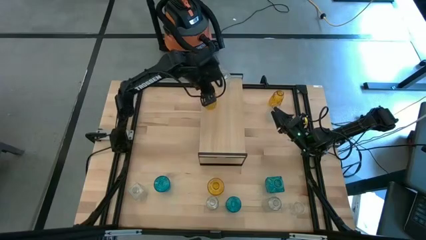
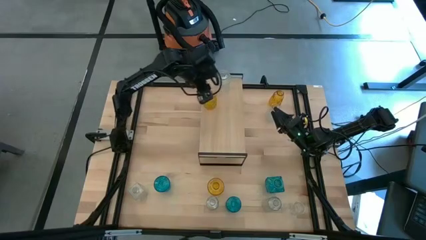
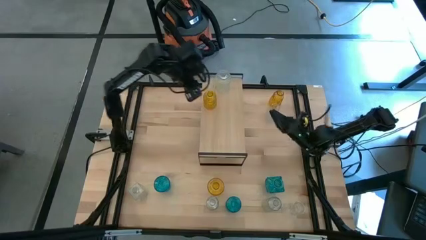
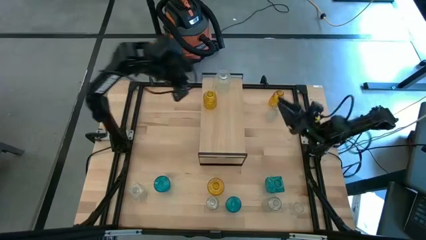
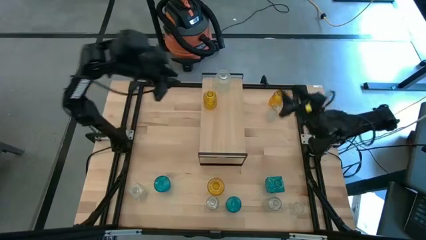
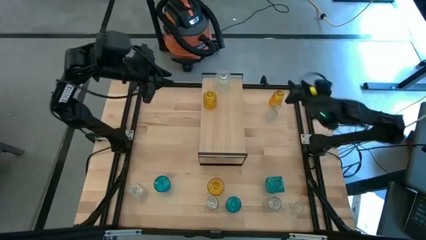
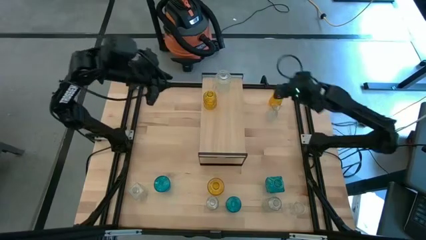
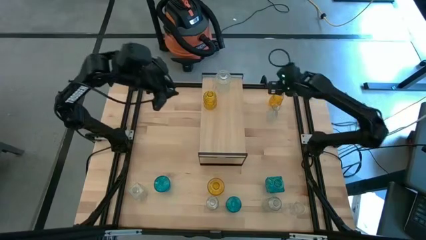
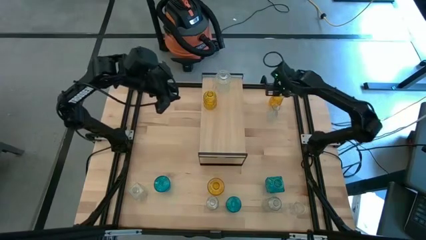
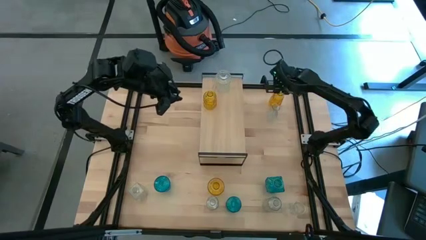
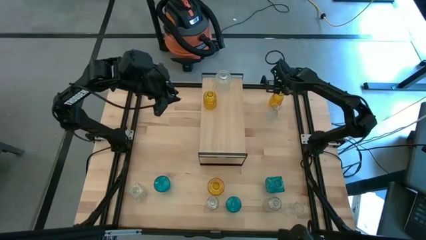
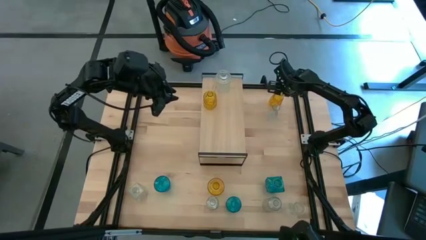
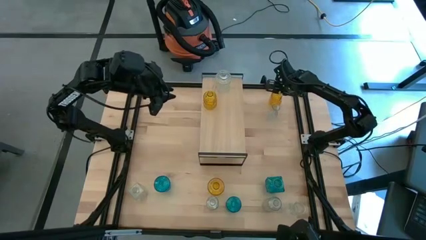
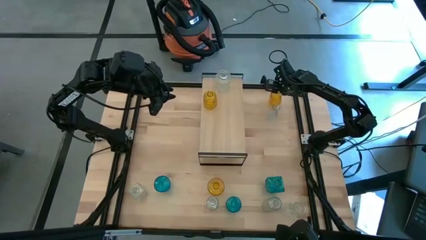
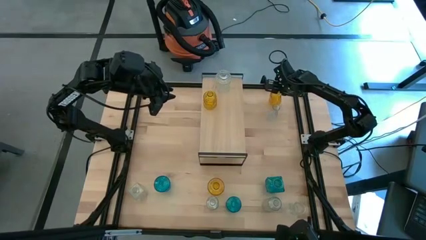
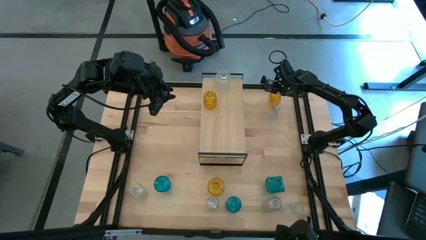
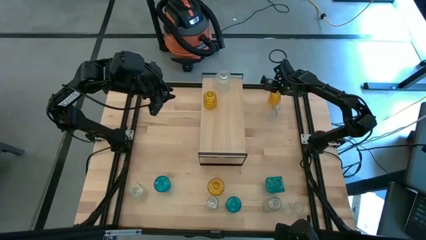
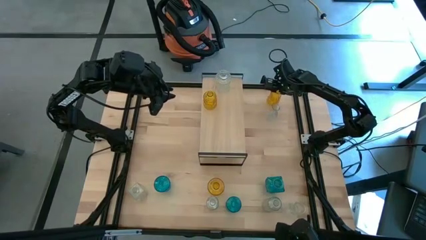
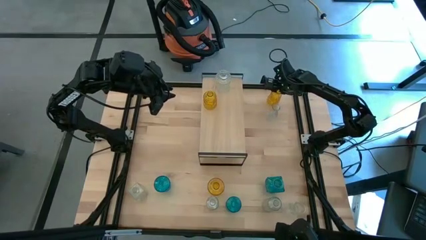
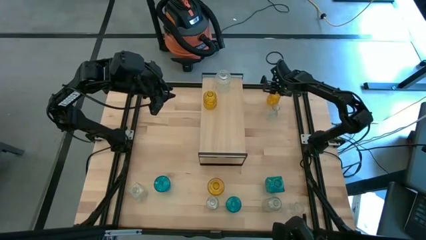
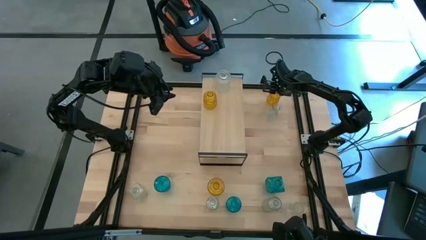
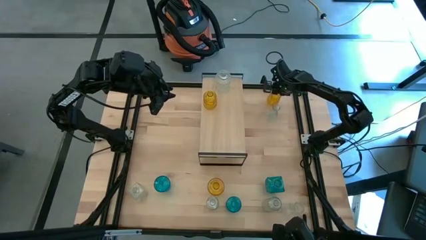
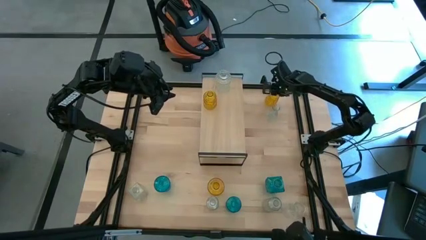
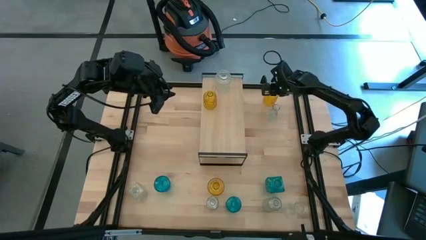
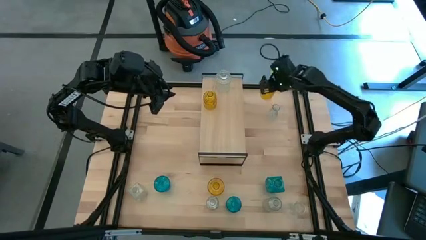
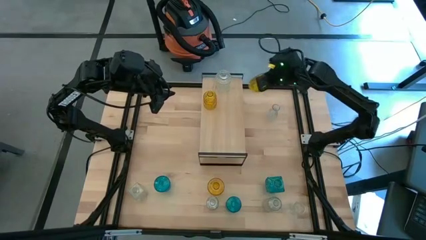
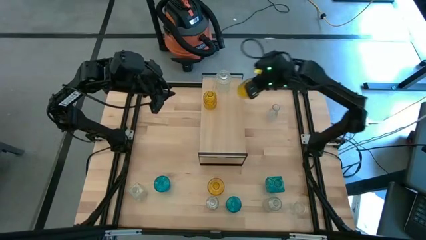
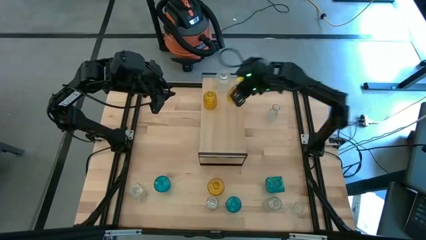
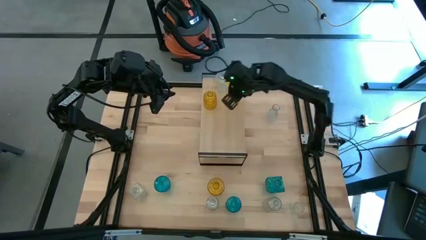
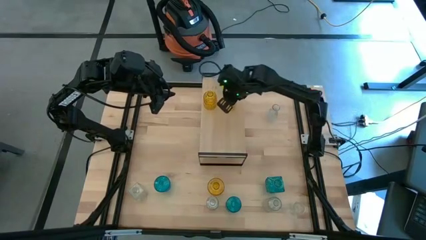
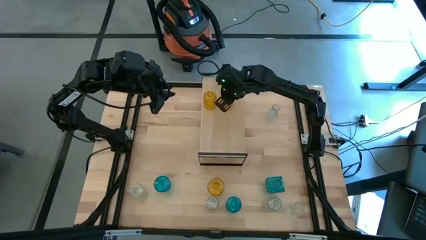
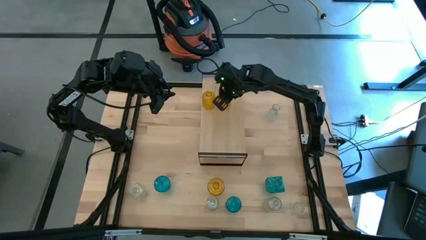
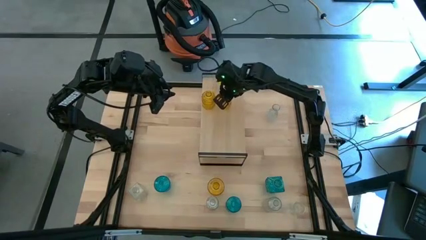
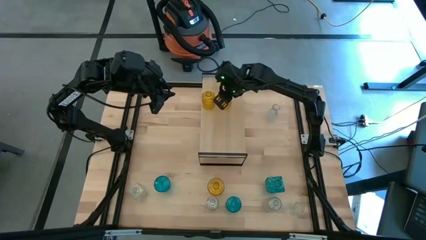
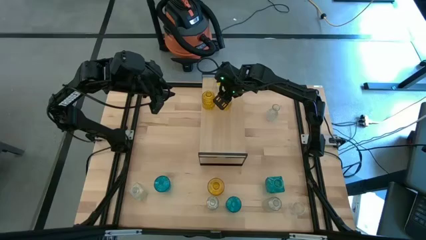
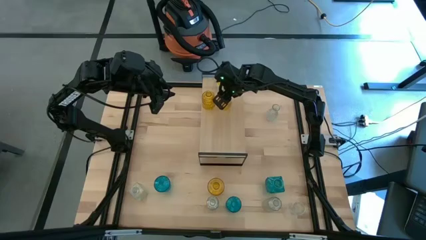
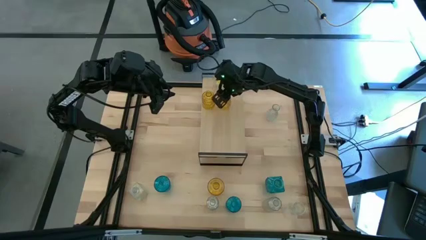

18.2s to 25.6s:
Task: sort vases onto shelf
Put the yellow vase on the shelf aligned with the other yellow vase

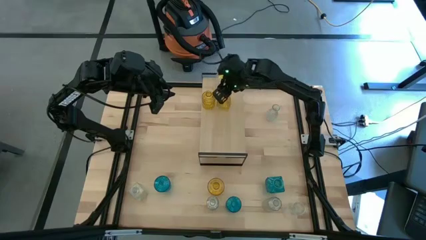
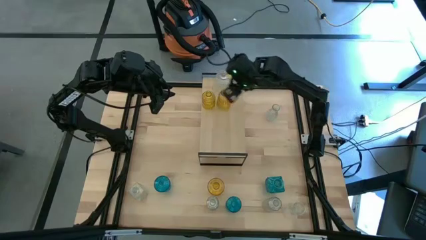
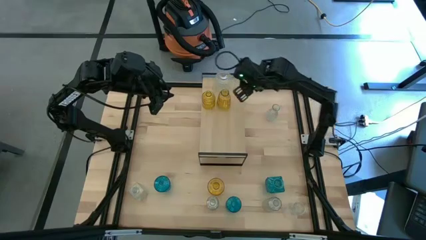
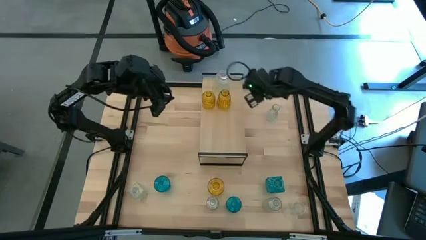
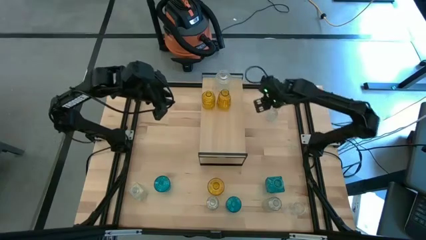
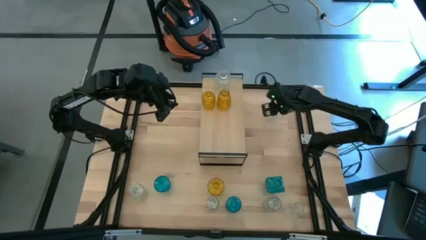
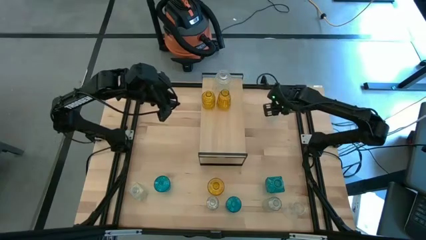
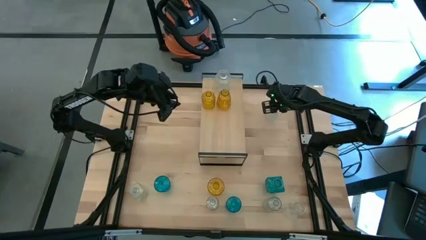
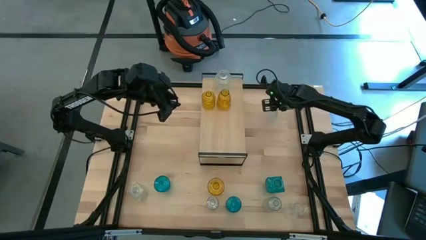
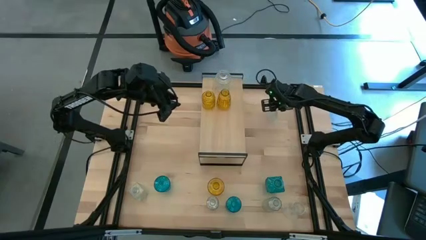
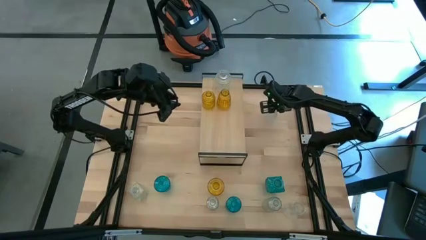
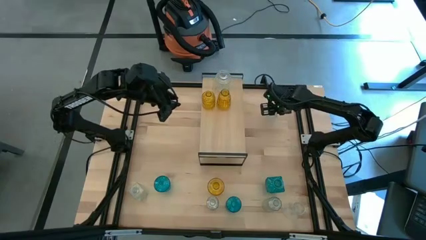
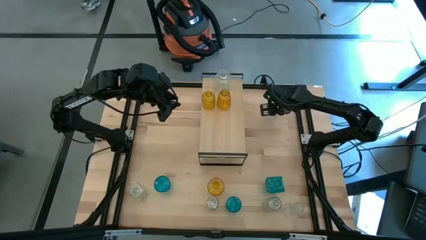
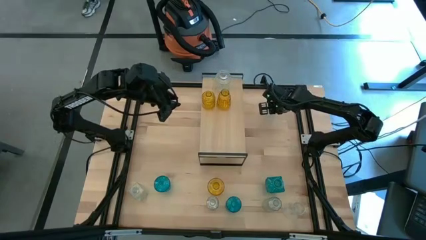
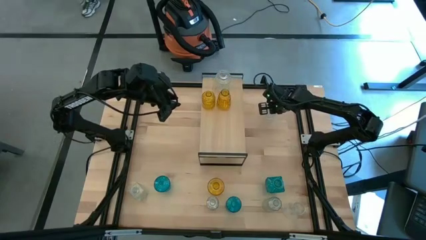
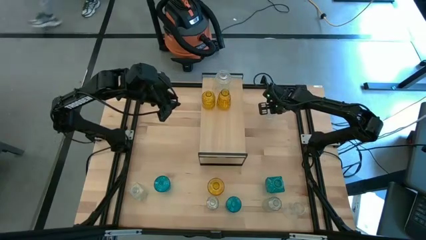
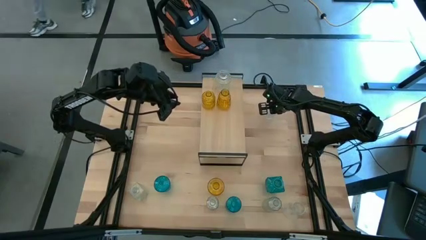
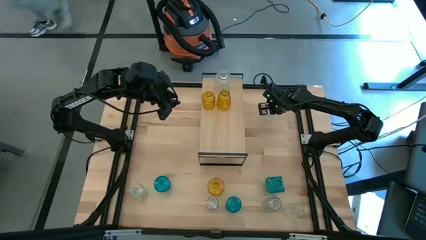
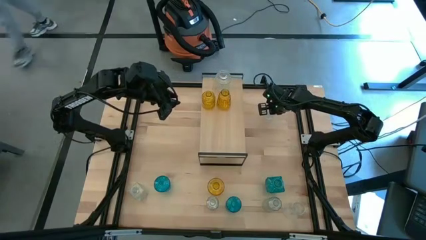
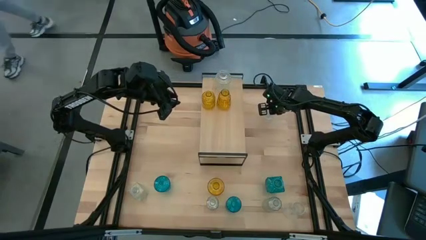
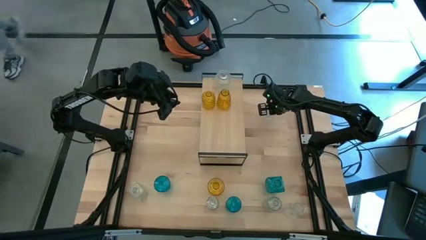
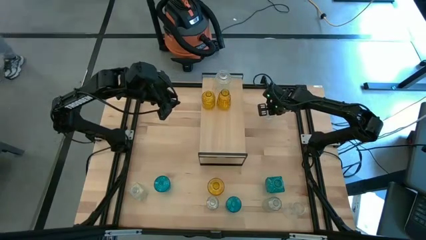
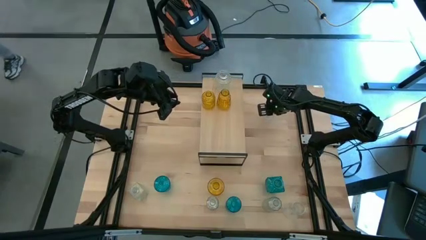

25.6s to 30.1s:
Put the transparent vase on the shelf aligned with the other transparent vase

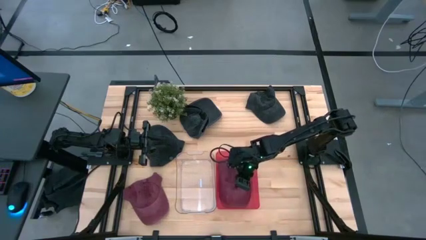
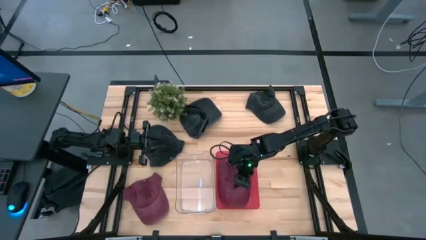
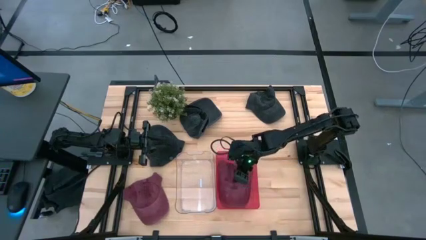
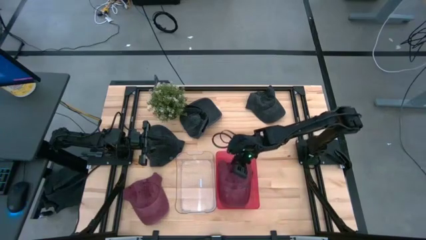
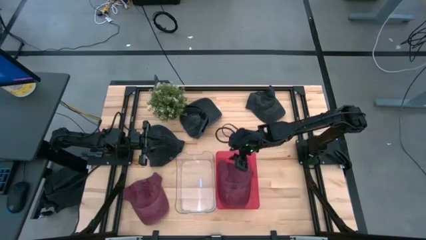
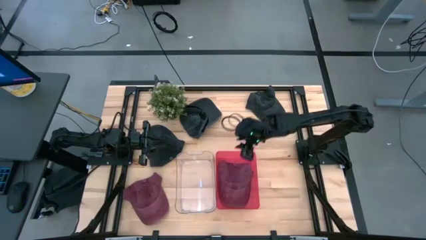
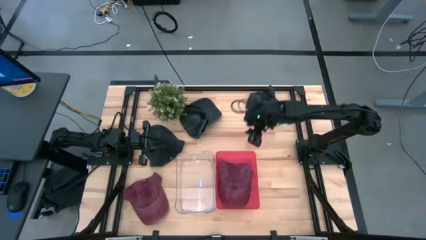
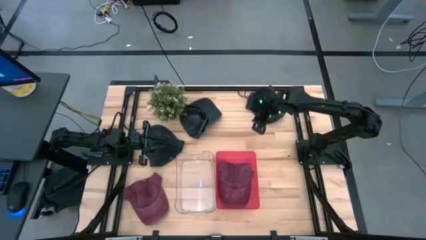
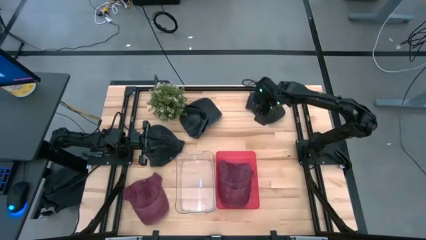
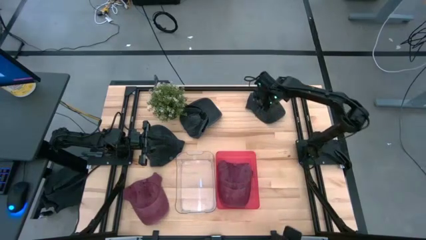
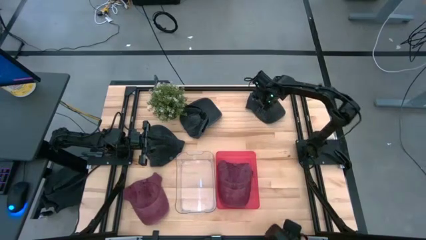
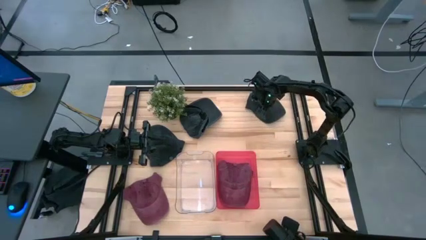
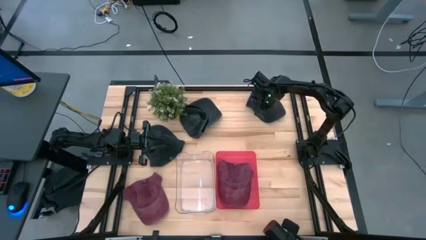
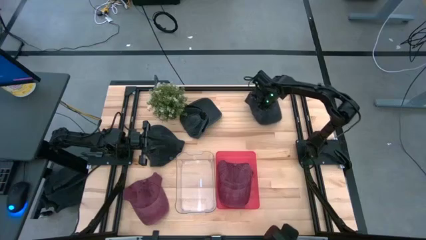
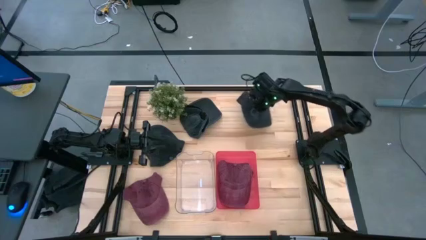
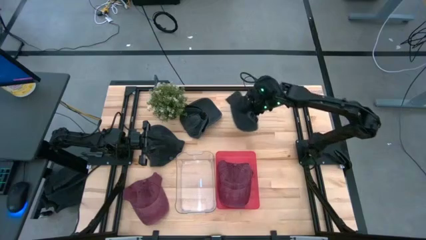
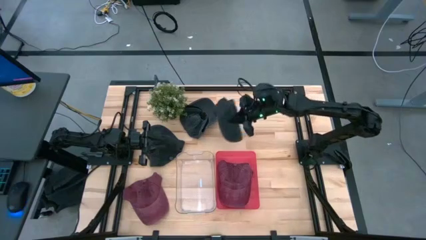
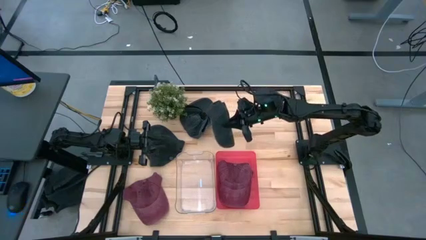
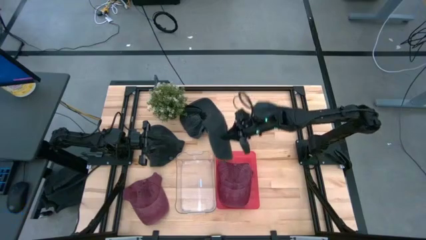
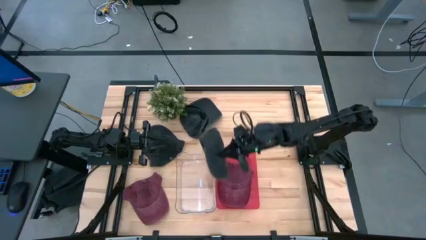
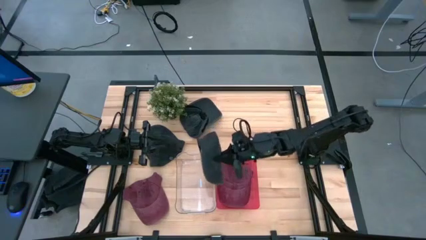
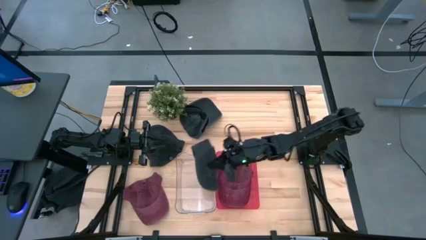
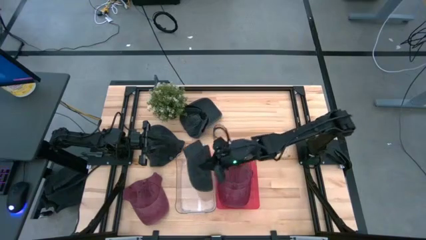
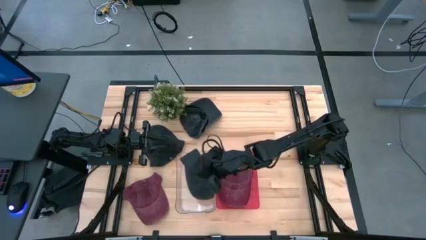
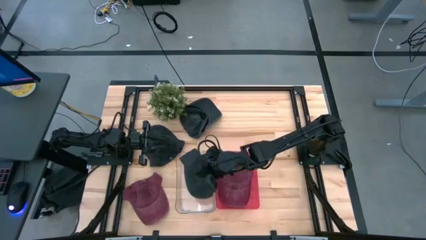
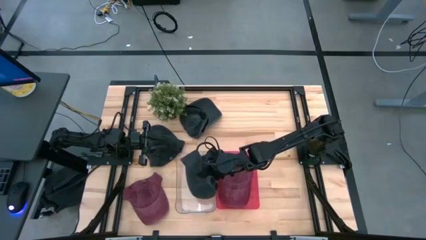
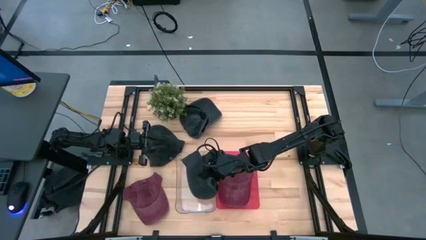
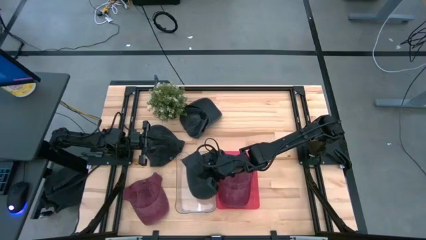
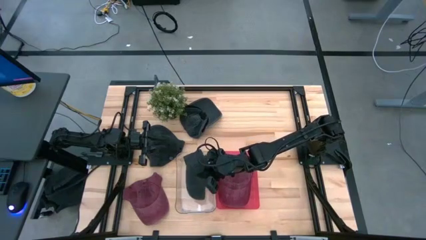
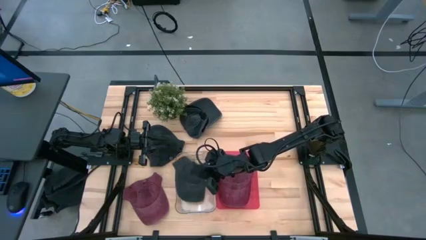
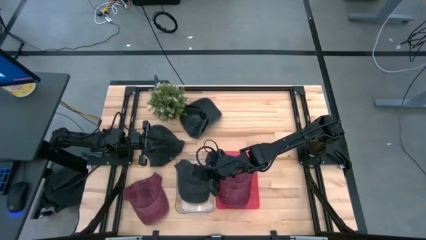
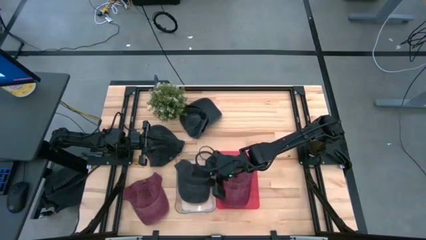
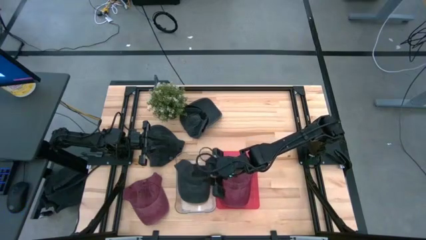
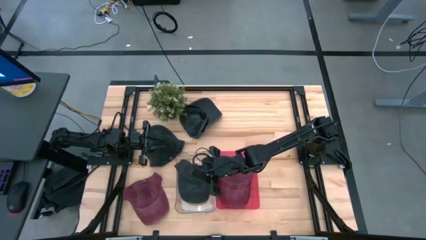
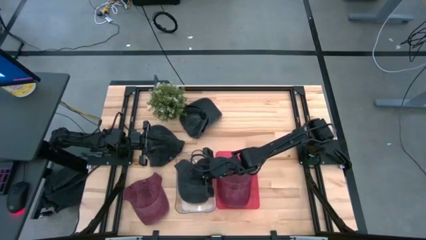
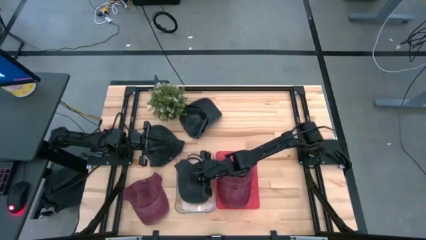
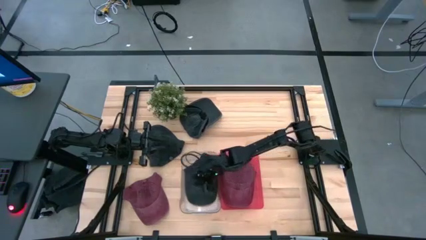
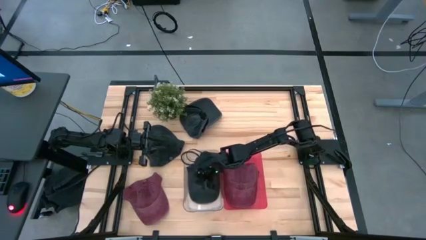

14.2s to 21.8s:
Task: Pick & Place hat
Put the top right black cap into the transparent bin
